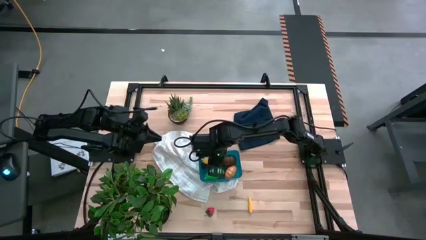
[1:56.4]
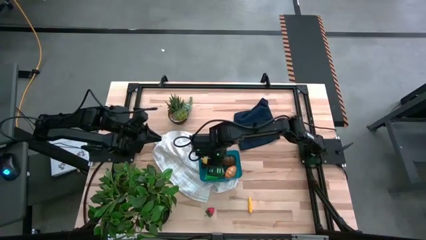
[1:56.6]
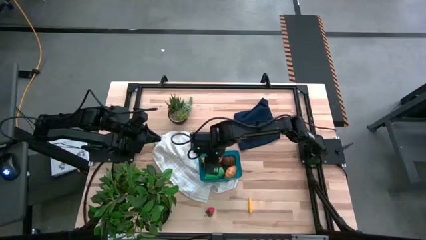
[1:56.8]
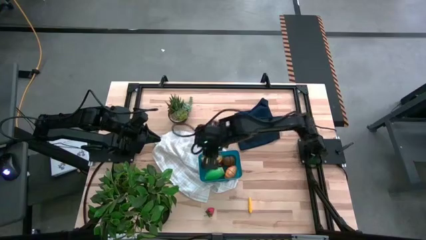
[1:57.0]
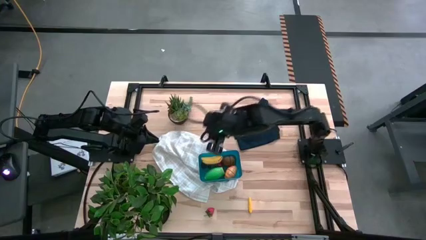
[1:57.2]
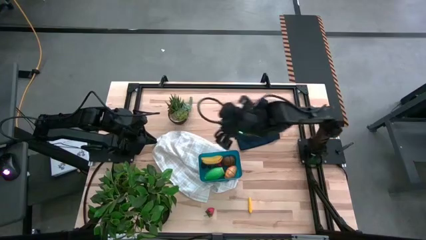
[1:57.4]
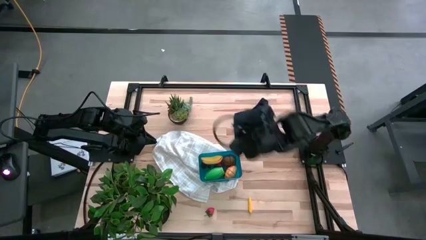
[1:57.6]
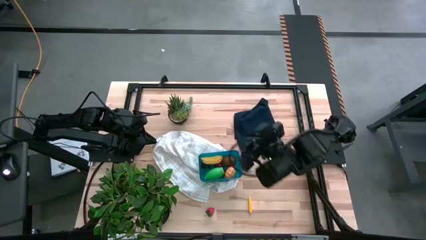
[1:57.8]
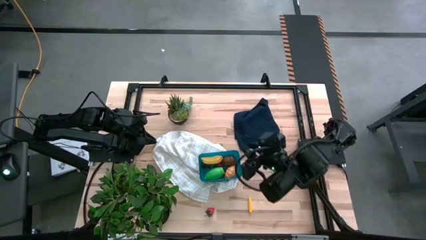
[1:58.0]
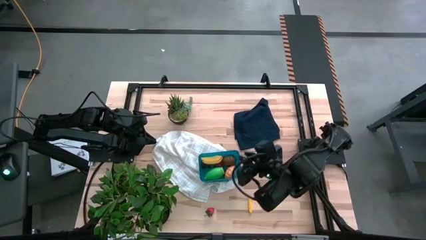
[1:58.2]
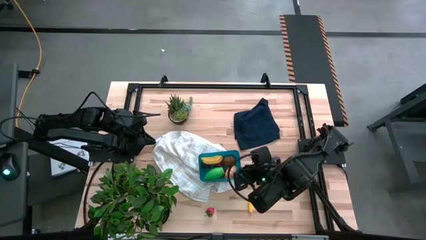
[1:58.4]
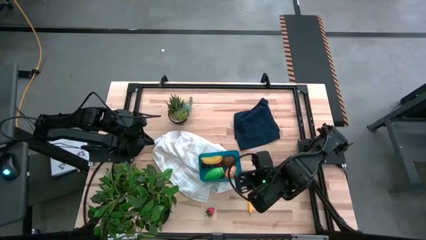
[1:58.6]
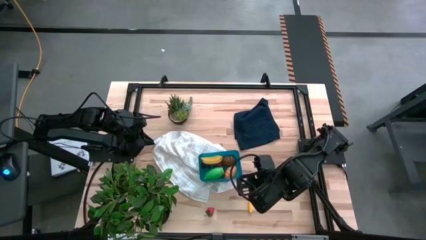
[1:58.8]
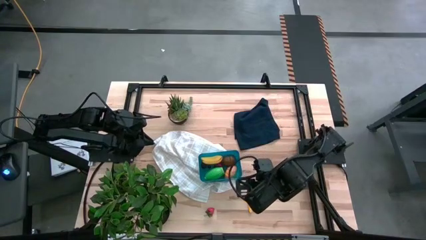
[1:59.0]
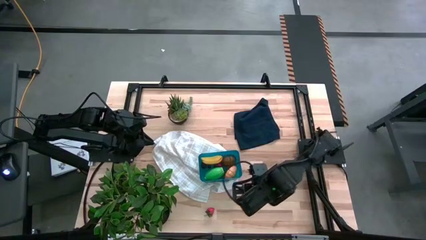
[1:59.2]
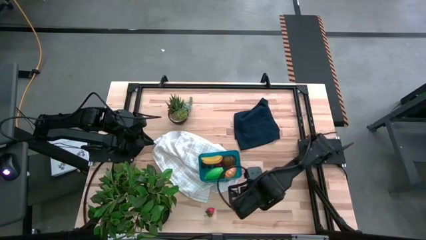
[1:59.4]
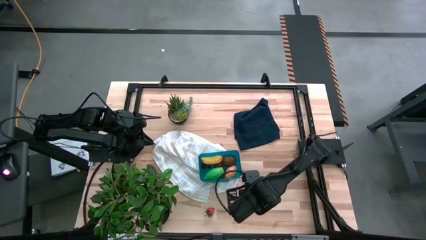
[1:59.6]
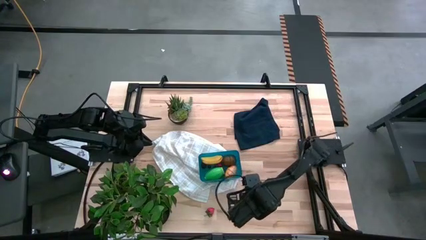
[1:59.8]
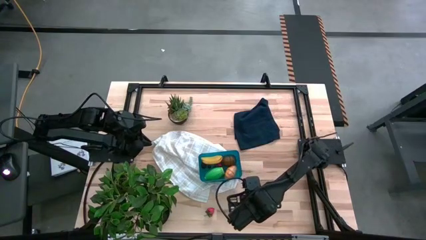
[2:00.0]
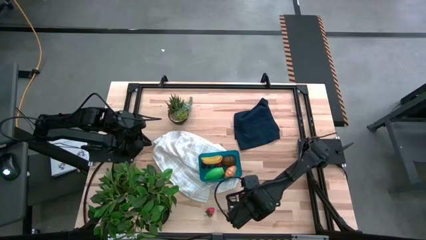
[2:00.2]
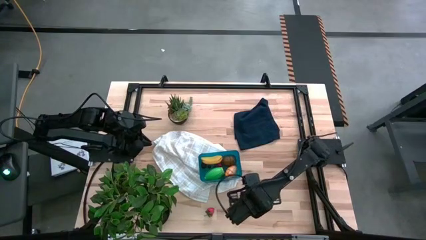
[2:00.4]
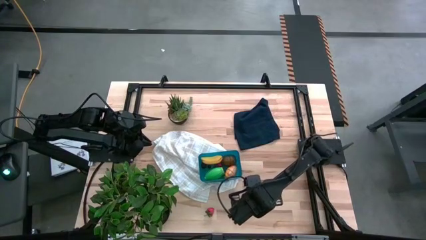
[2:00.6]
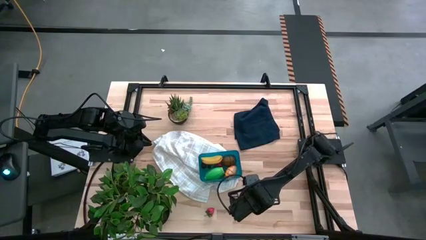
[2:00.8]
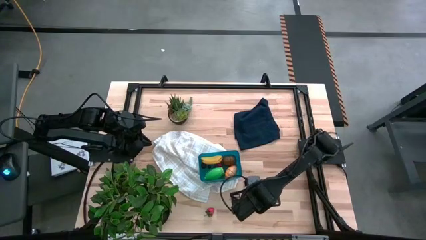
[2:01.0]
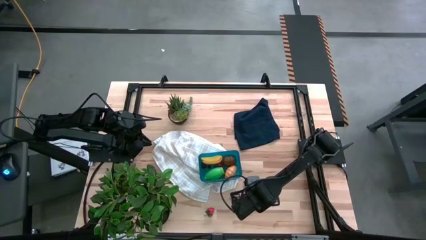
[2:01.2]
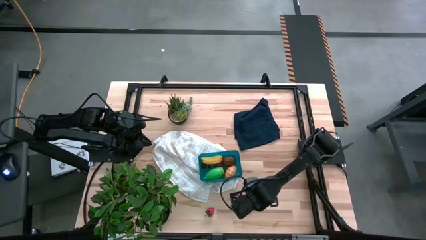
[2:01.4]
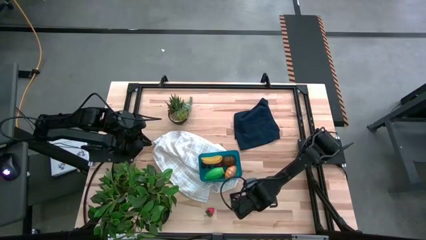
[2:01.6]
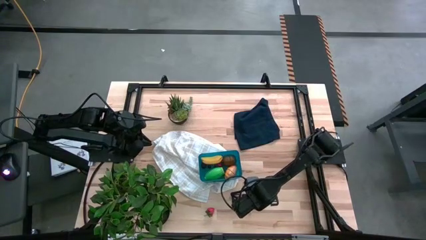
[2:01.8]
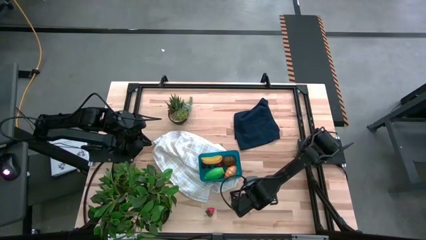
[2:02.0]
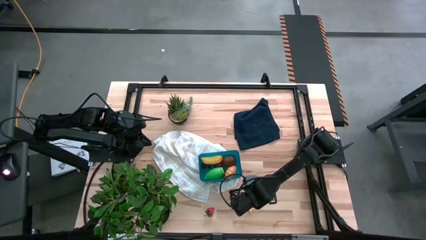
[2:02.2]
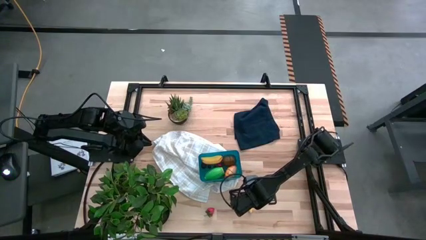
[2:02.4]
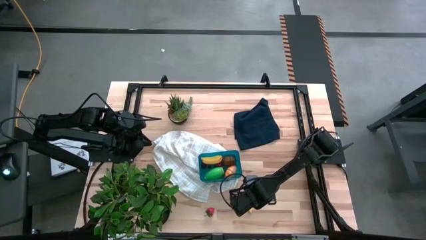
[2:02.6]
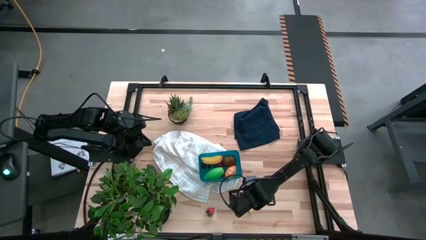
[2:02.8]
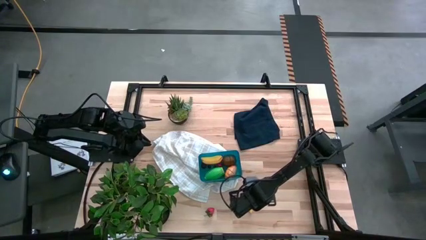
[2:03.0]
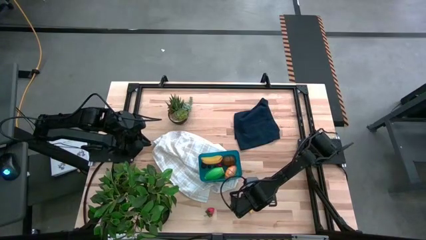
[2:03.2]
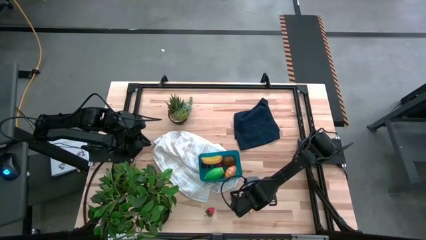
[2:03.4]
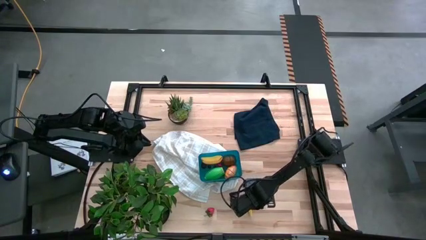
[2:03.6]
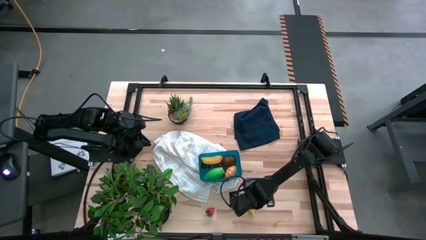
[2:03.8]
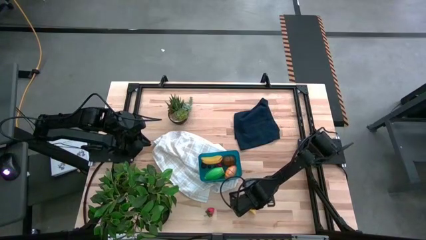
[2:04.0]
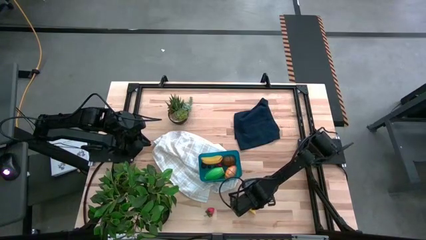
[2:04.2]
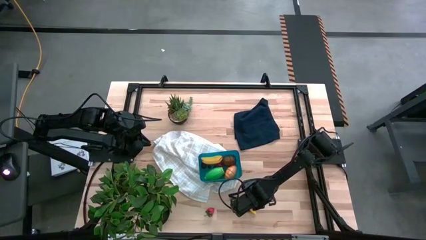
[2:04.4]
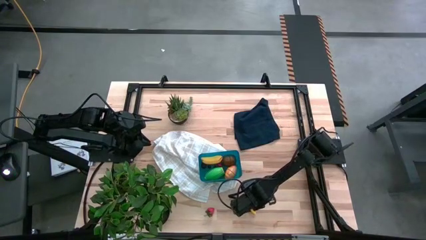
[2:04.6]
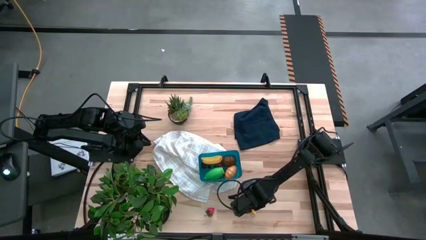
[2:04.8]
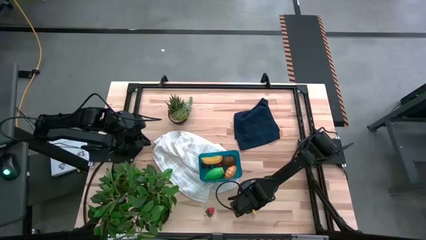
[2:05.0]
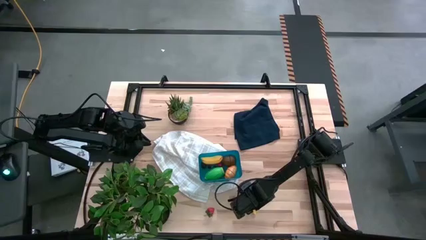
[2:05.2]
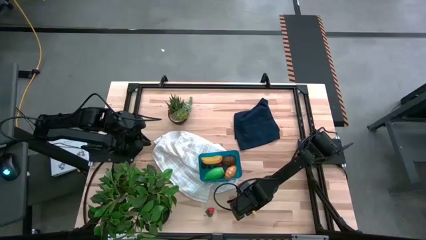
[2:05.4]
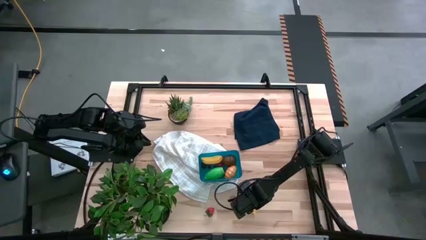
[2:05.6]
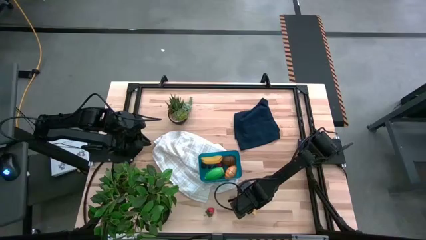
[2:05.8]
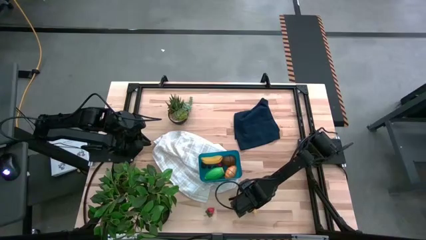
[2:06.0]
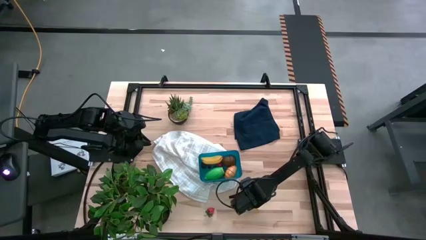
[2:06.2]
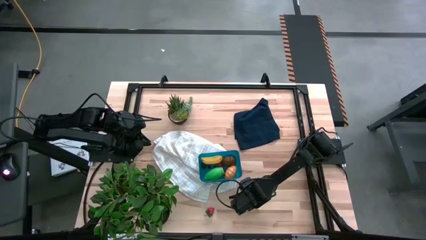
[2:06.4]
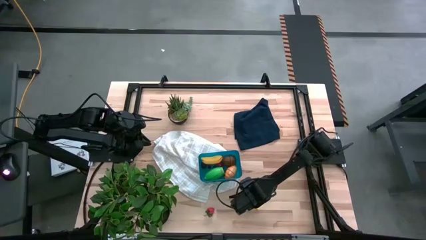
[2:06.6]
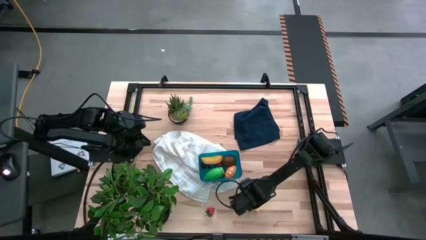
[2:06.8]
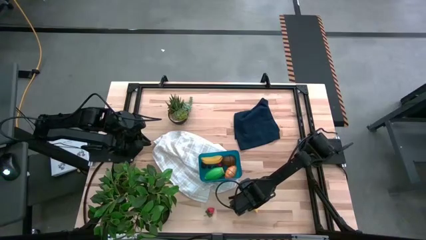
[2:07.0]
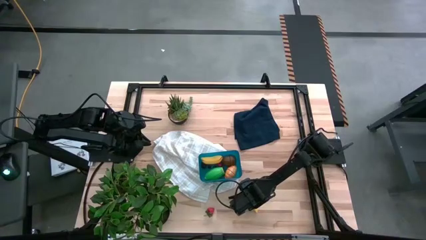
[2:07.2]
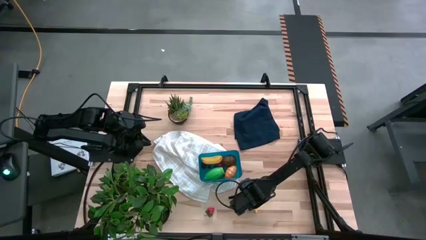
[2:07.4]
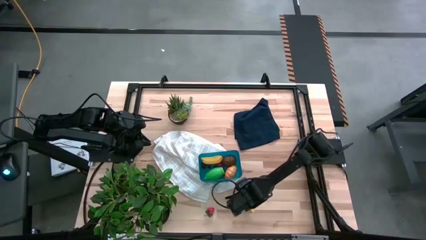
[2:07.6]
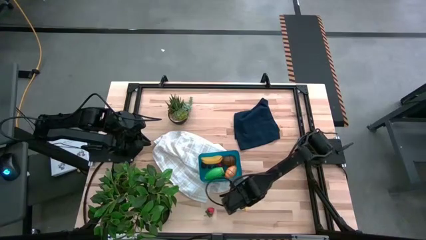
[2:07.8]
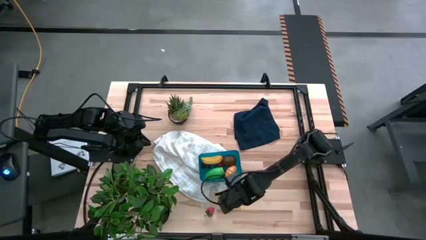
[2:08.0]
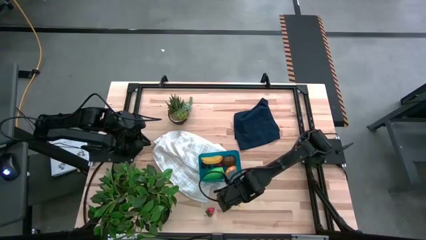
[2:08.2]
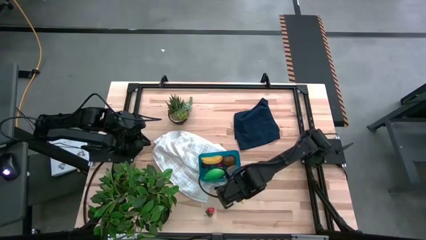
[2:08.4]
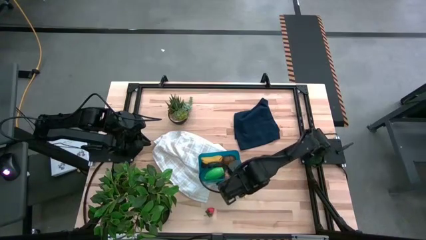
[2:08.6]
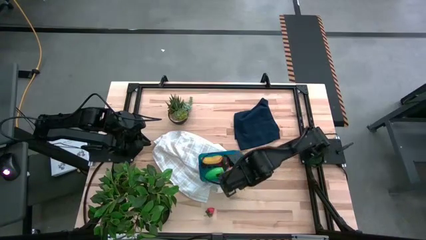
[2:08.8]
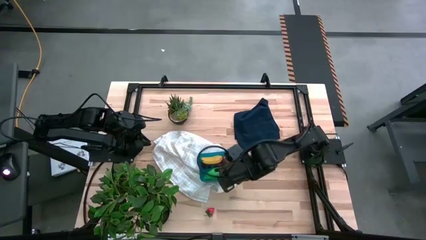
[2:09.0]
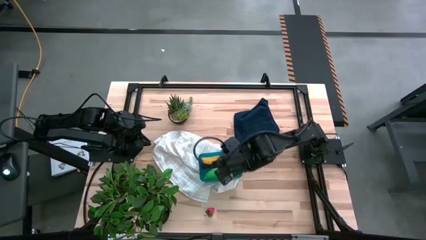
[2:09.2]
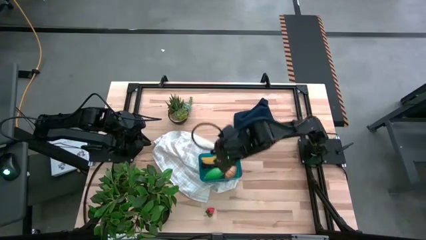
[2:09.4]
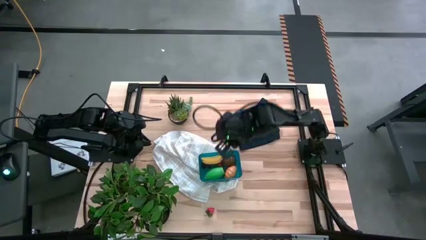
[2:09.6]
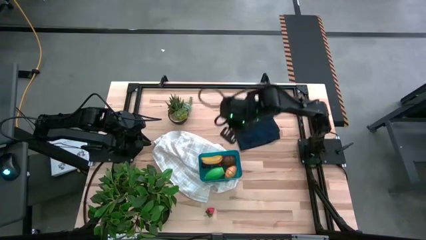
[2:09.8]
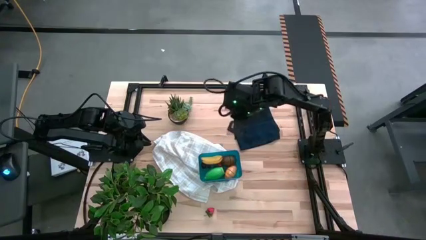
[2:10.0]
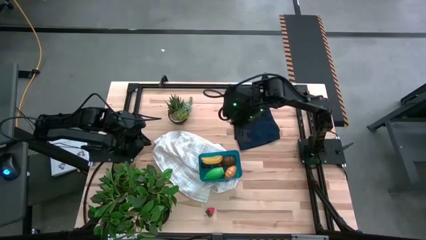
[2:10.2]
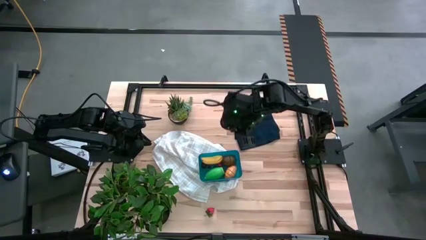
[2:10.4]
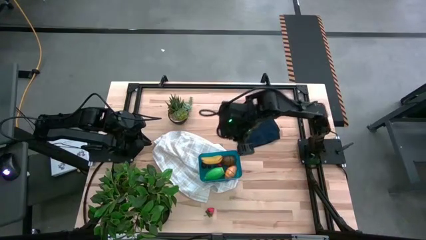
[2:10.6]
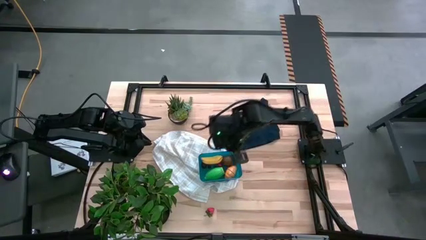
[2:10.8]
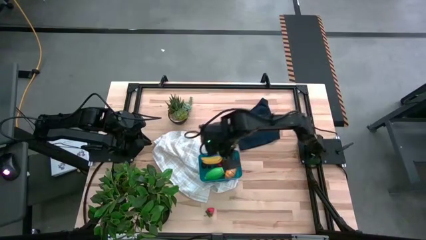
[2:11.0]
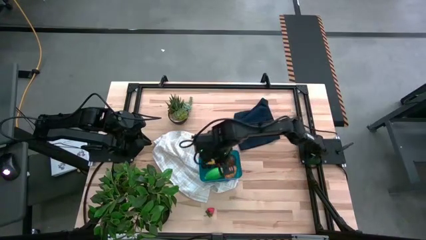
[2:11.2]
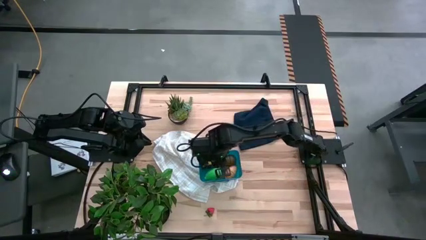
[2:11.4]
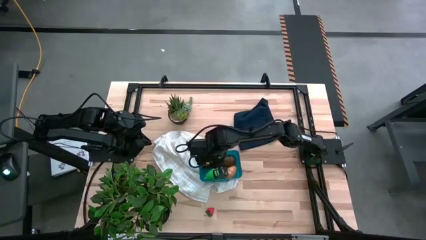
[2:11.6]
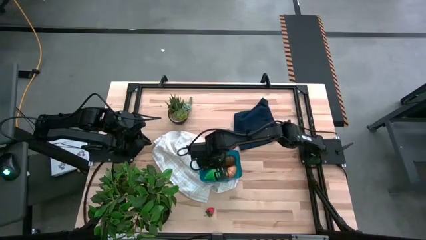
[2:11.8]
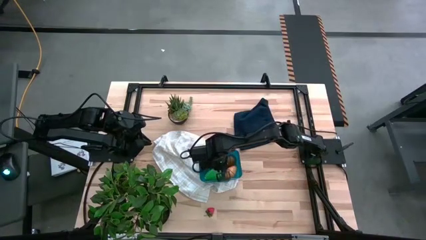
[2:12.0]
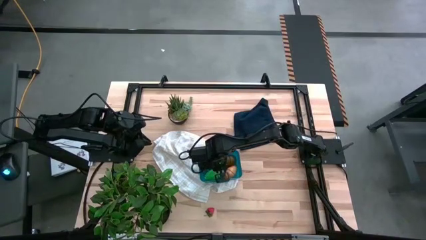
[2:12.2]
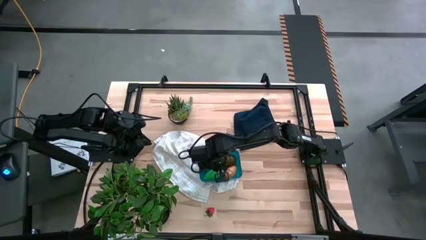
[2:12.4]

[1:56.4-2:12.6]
Task: Pick and placing Produce into tupperware
Put the yellow corn into the blue bin
